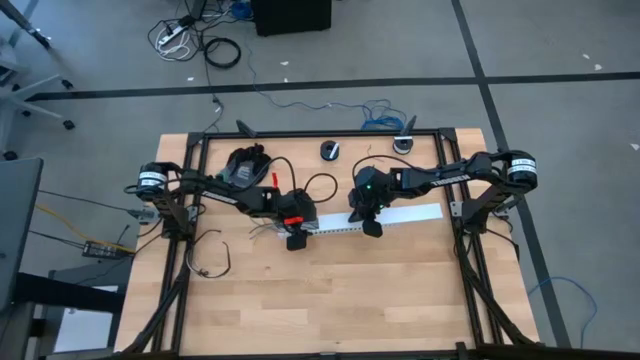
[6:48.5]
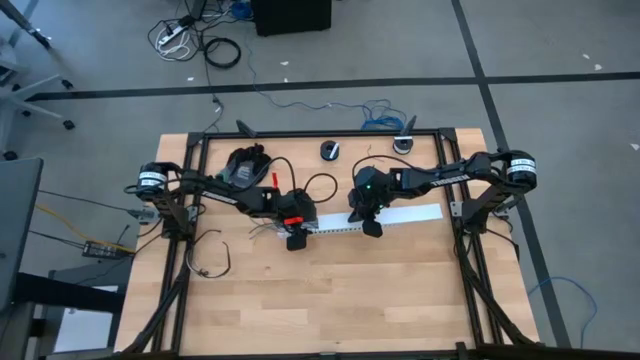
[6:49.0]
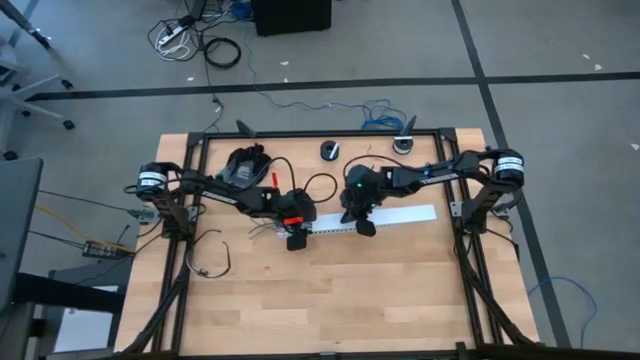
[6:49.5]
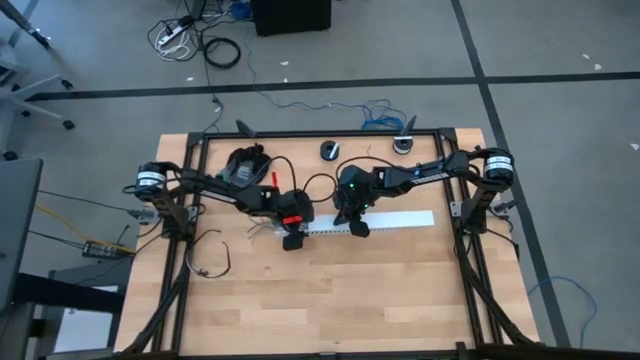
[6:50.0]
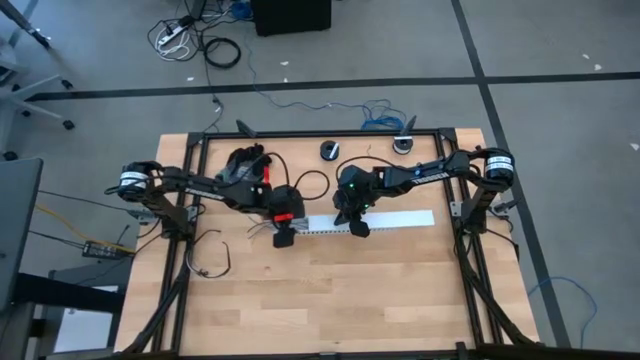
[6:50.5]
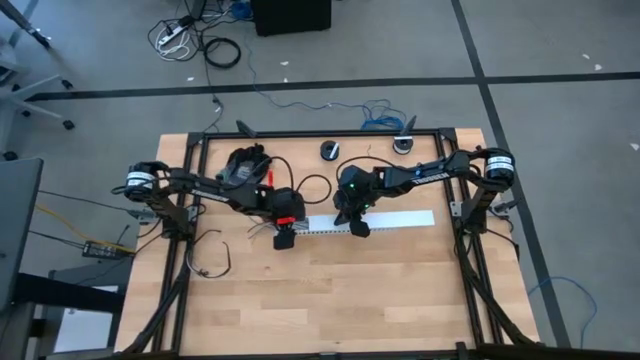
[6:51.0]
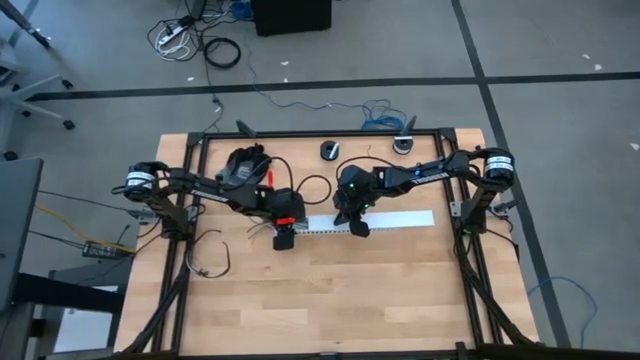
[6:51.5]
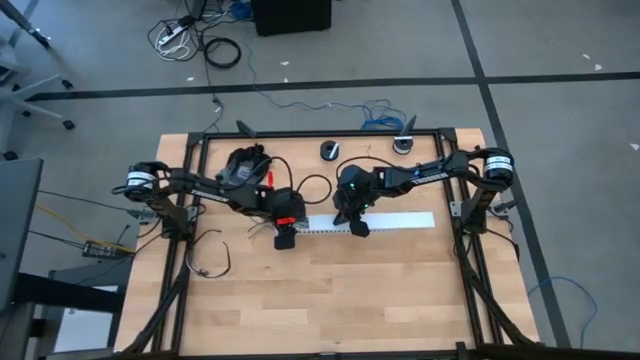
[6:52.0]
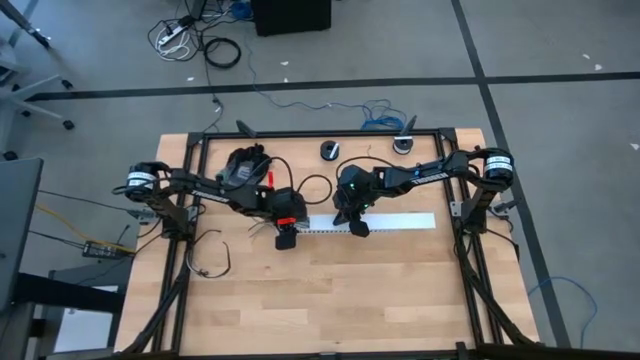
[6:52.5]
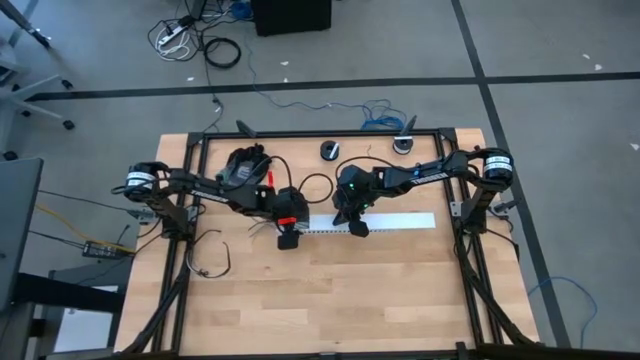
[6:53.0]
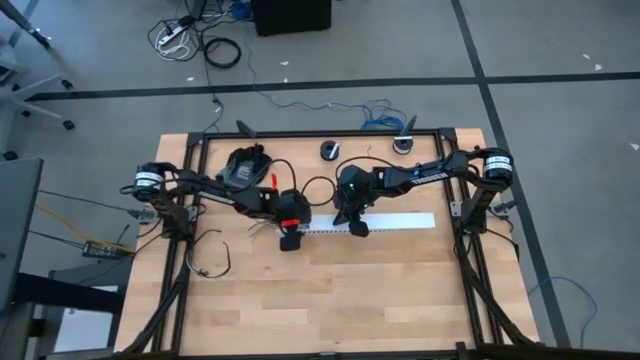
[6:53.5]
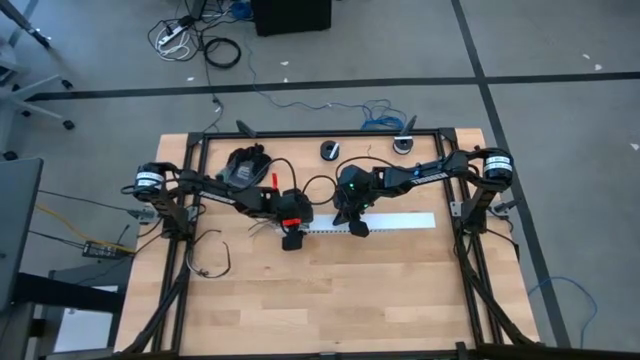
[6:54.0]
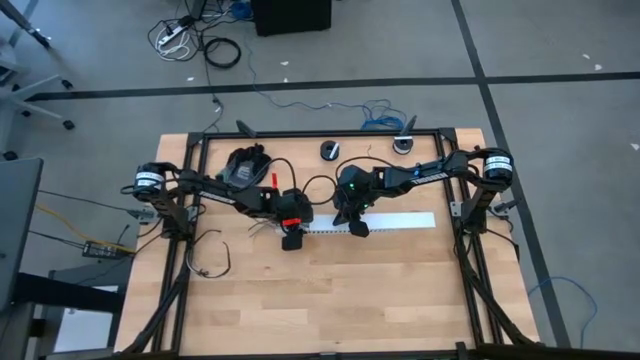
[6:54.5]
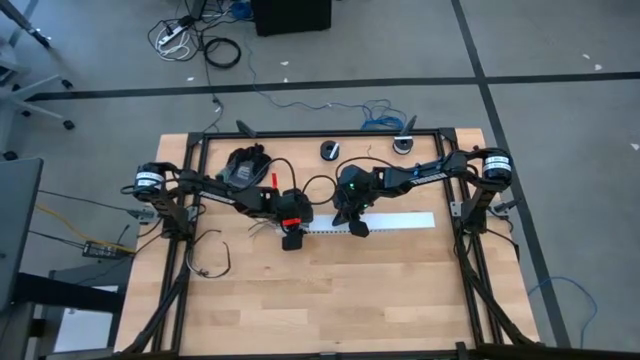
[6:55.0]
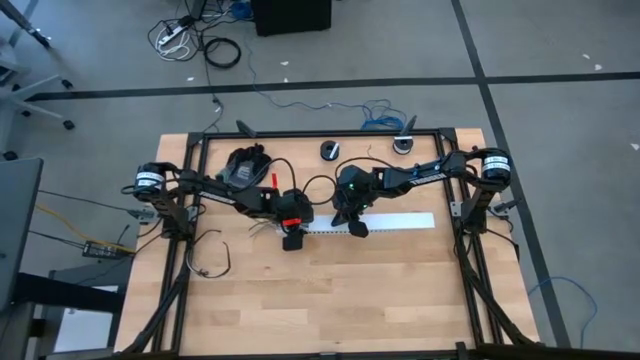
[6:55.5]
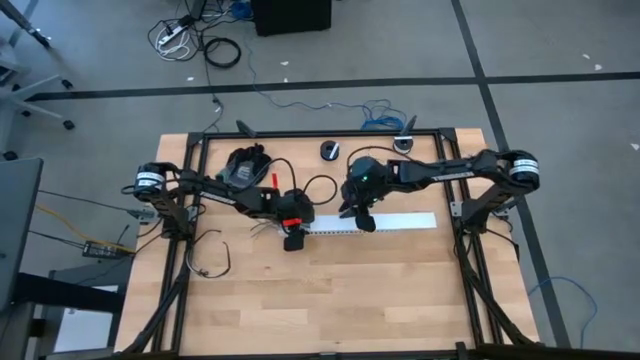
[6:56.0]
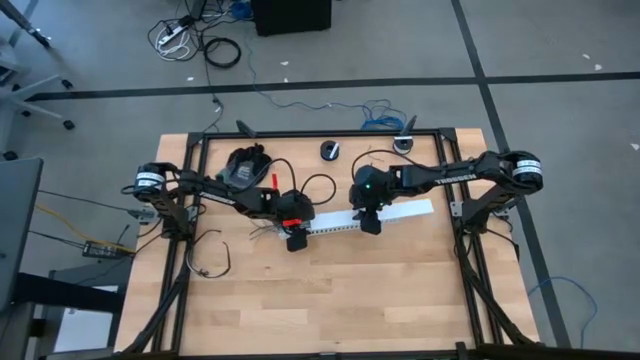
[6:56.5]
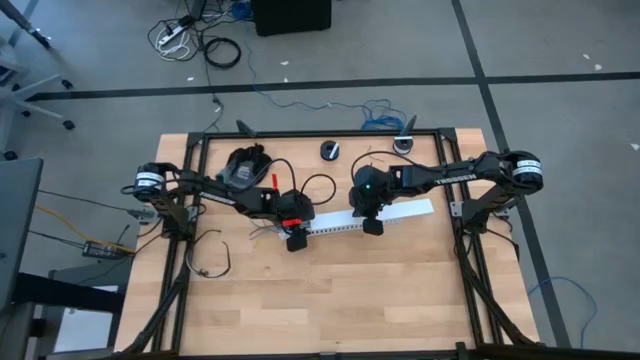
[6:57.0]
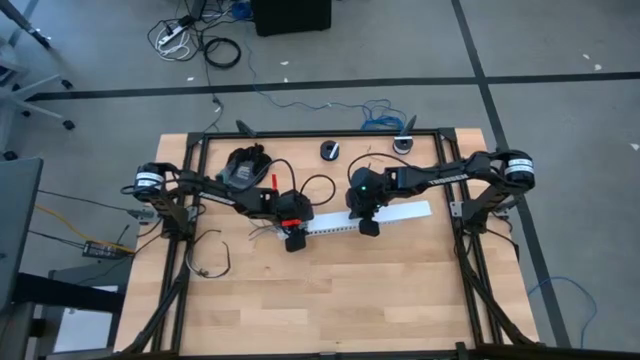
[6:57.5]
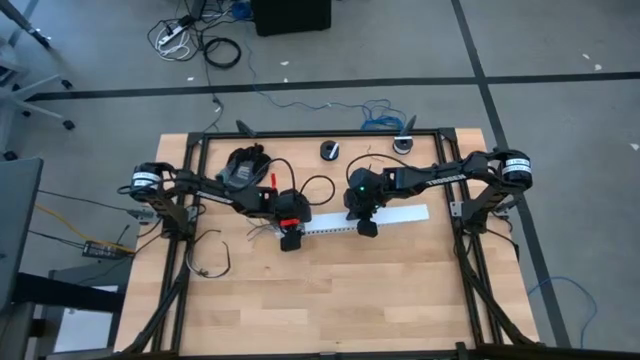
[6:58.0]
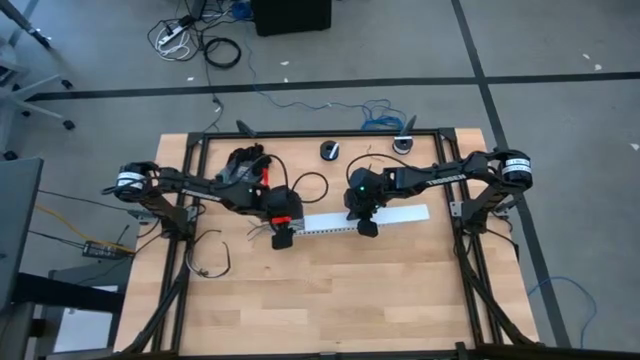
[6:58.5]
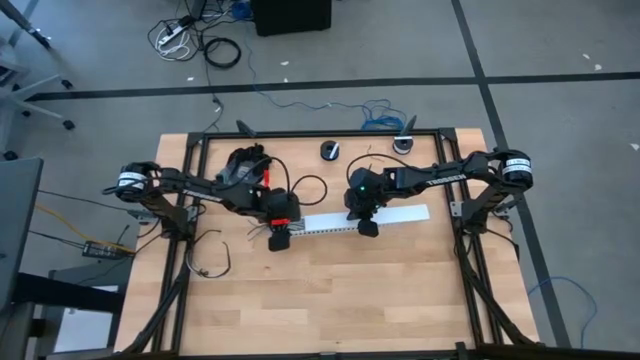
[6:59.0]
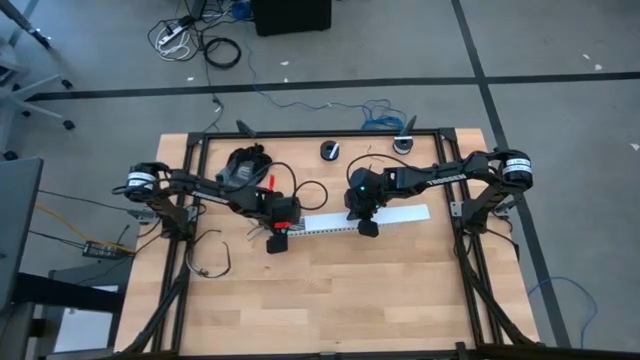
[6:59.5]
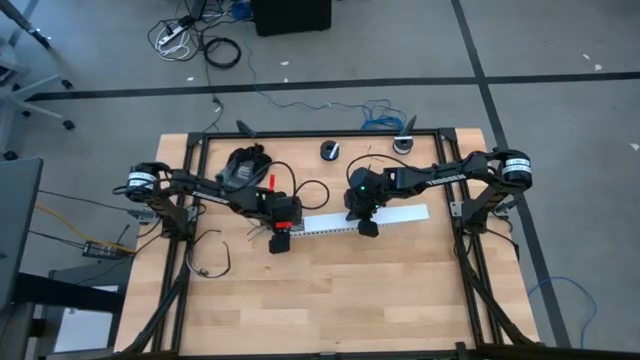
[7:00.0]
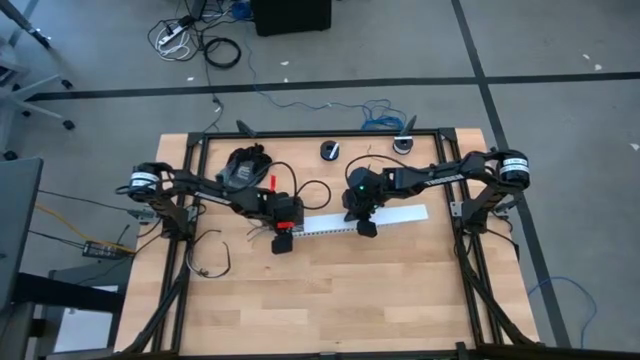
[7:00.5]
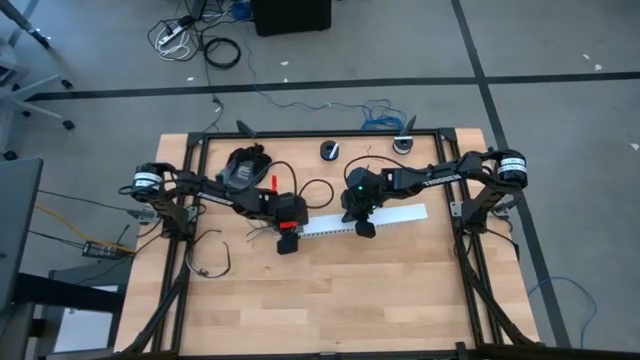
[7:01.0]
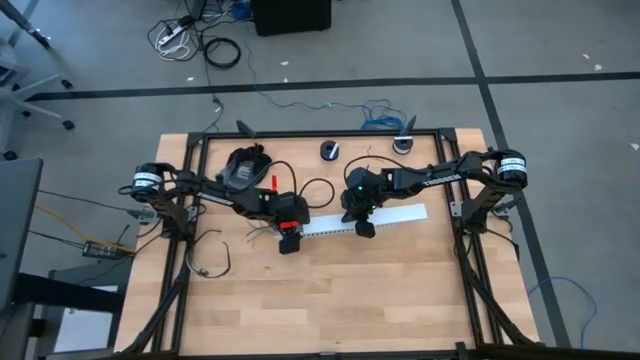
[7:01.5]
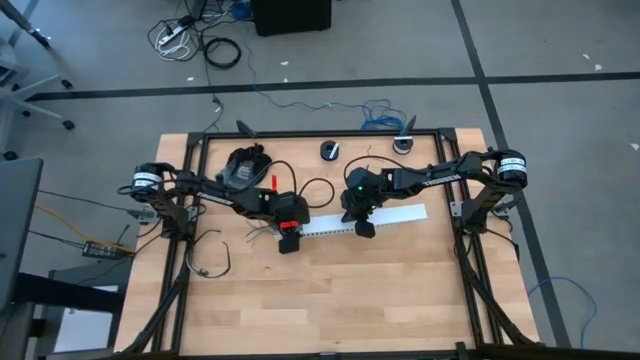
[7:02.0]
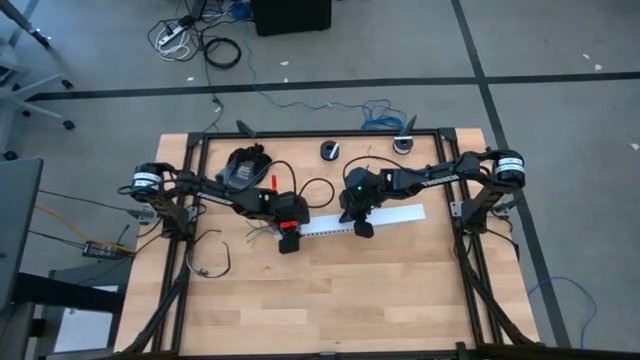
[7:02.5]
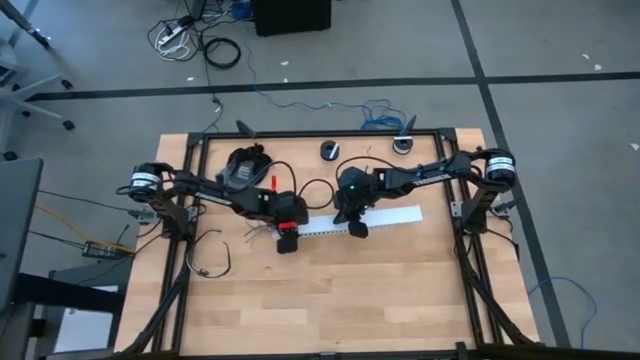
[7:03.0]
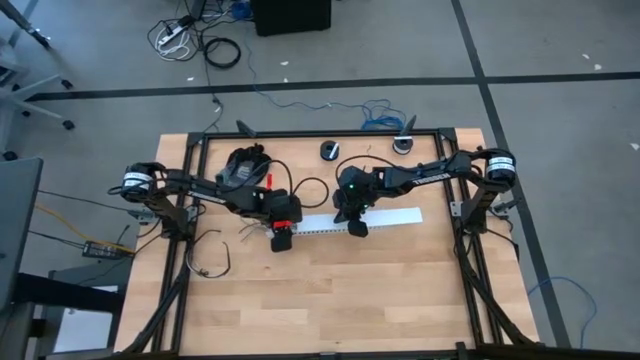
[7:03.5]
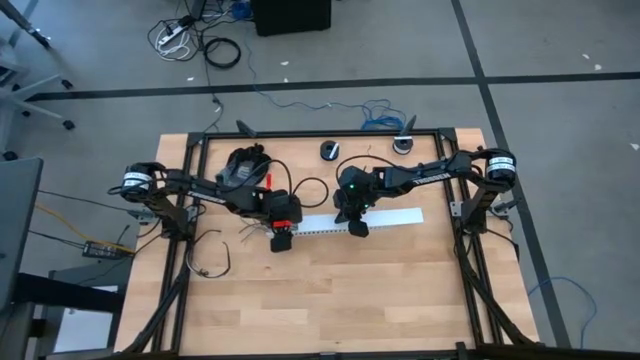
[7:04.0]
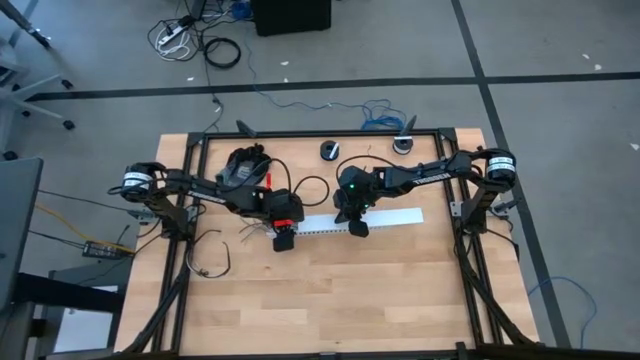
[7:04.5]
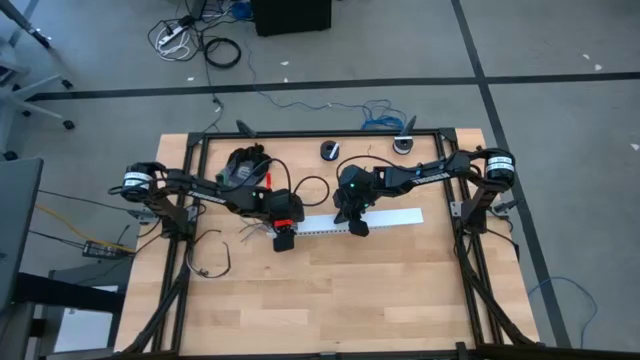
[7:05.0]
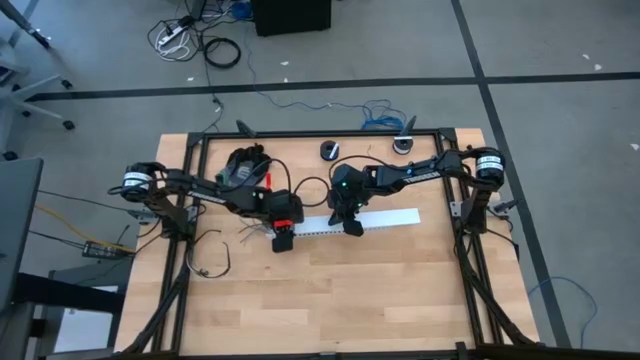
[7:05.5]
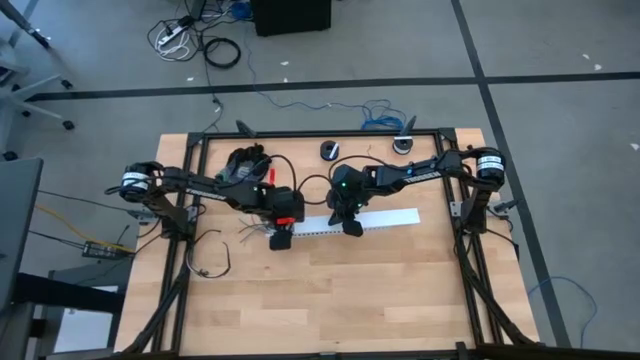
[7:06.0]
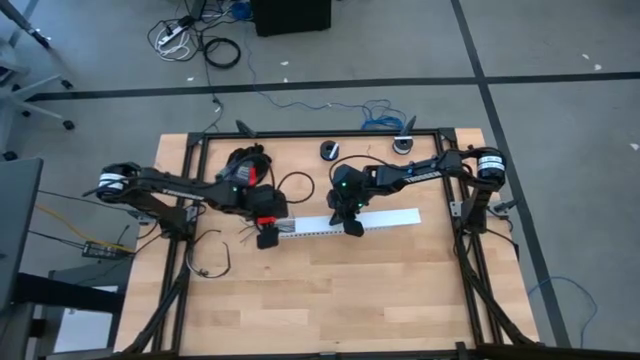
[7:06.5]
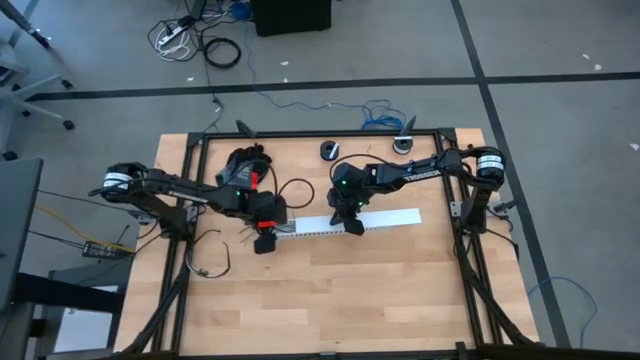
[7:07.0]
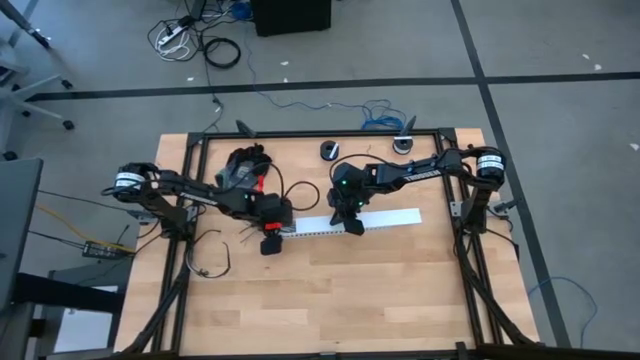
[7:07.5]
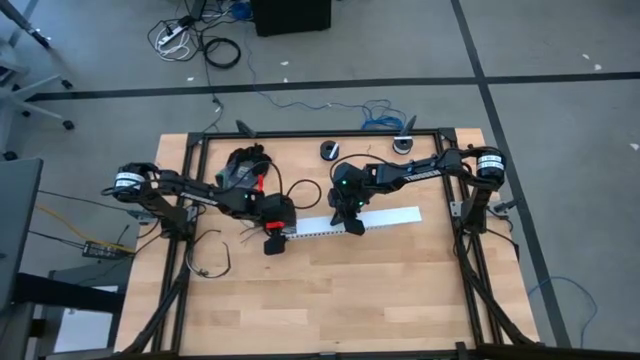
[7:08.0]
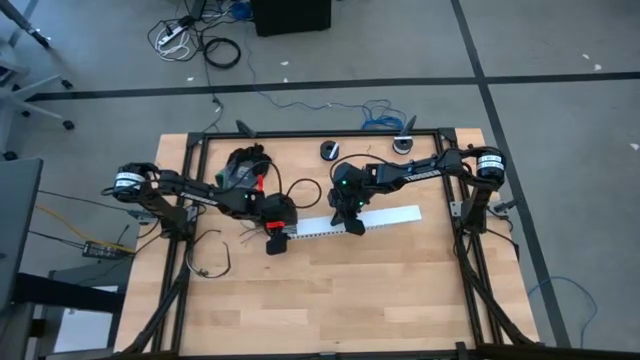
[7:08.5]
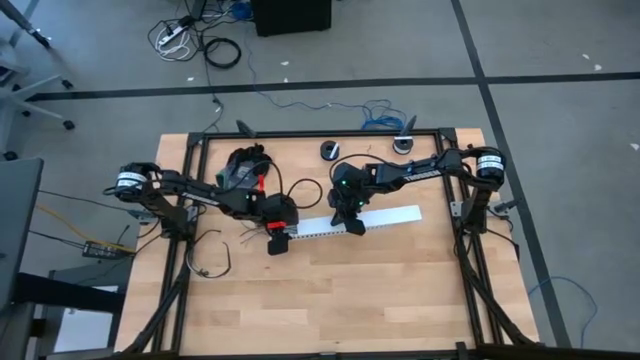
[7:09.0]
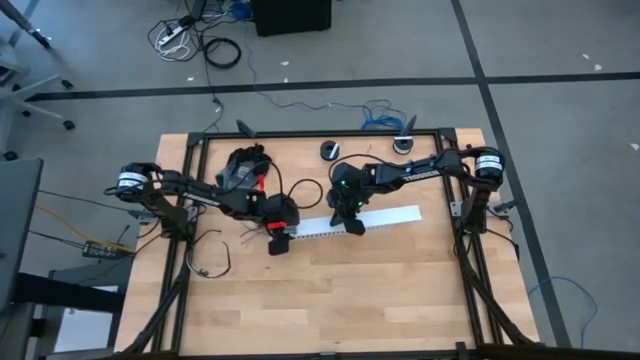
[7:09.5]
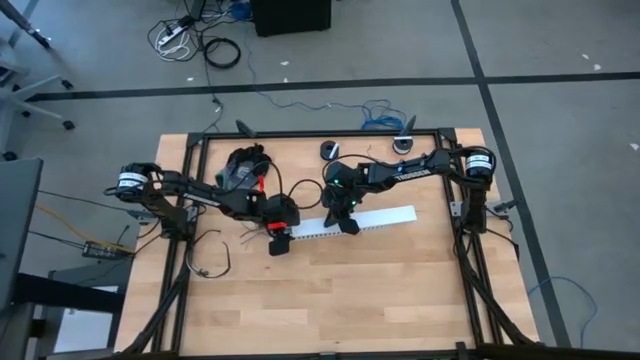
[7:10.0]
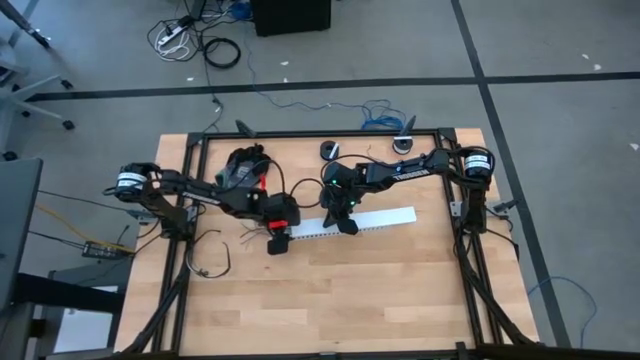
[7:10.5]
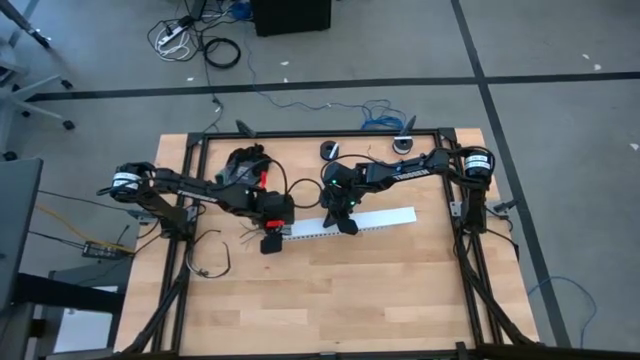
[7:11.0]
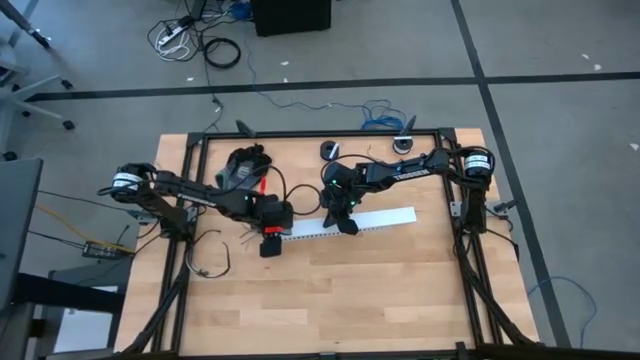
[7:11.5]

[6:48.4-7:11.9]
Task: Ziptie cables
Close the white cable duct
